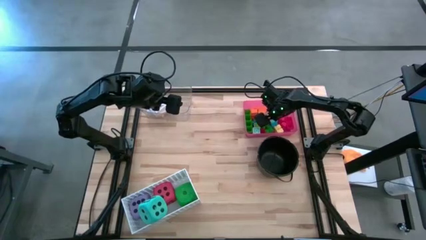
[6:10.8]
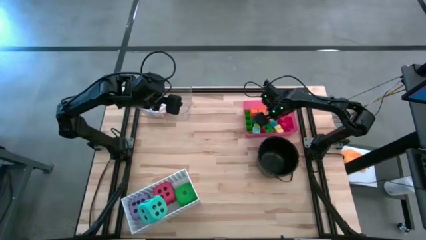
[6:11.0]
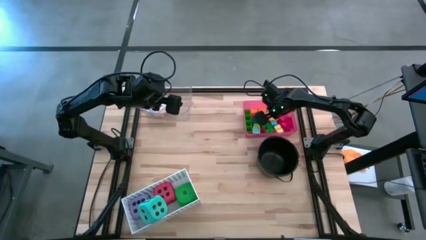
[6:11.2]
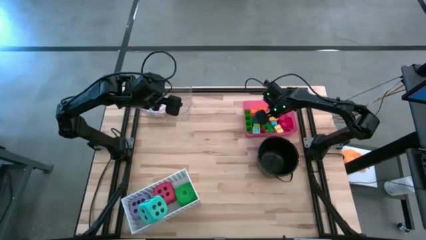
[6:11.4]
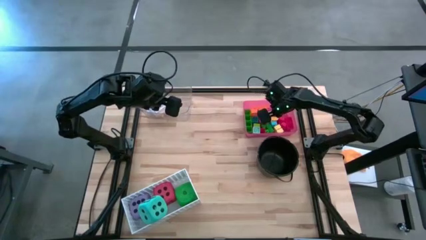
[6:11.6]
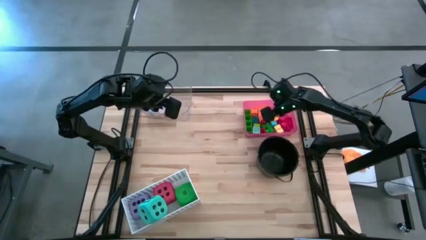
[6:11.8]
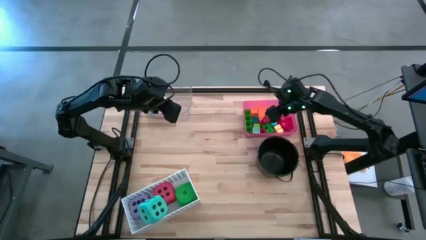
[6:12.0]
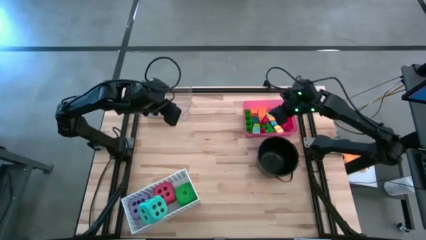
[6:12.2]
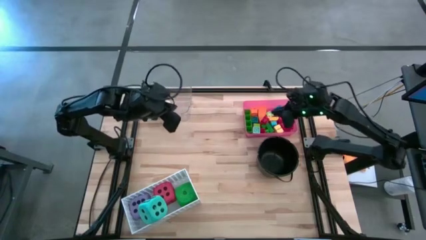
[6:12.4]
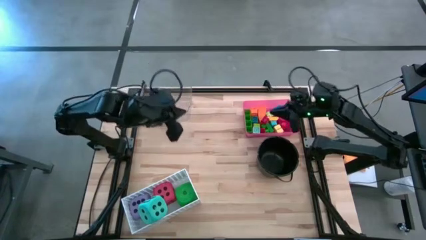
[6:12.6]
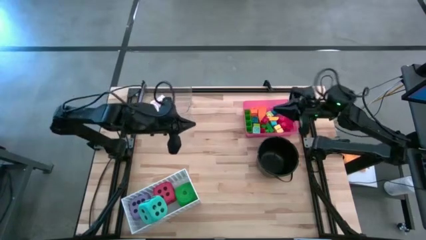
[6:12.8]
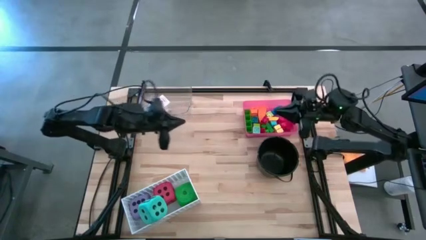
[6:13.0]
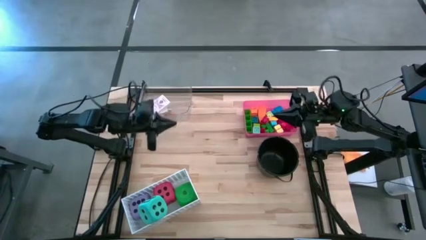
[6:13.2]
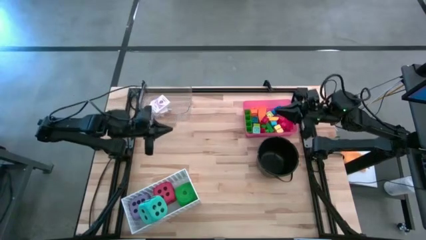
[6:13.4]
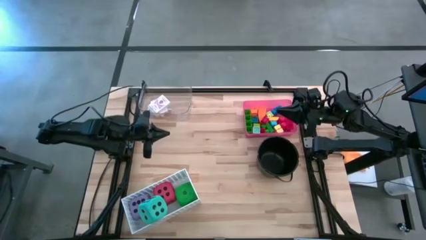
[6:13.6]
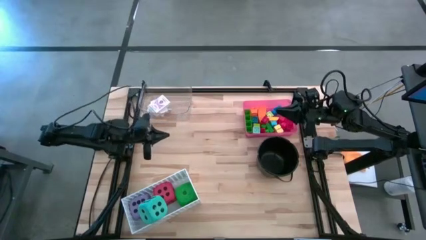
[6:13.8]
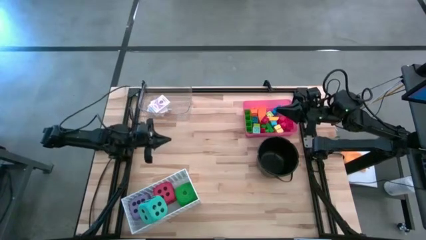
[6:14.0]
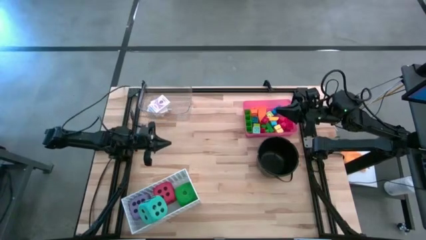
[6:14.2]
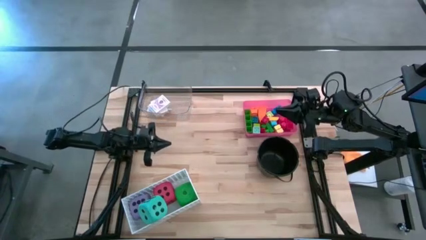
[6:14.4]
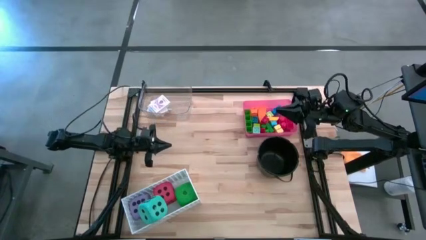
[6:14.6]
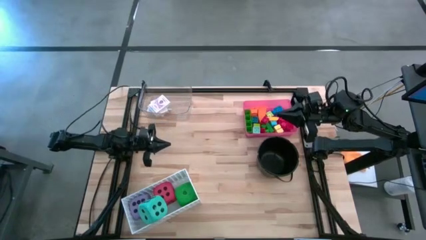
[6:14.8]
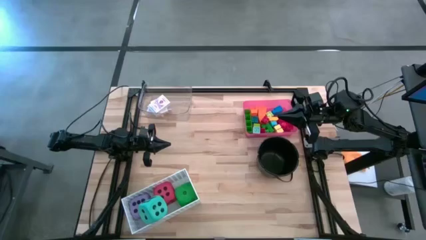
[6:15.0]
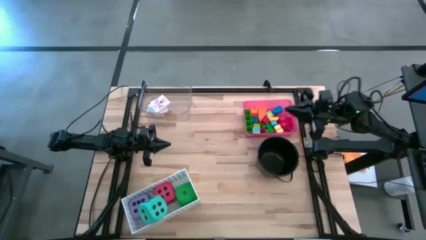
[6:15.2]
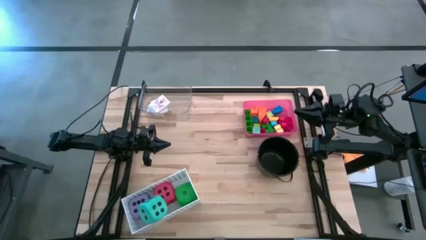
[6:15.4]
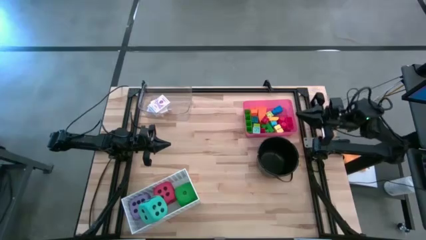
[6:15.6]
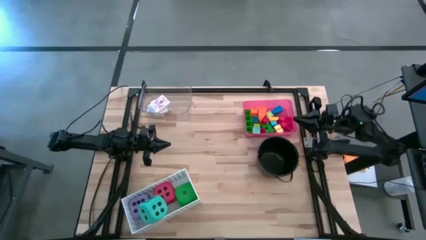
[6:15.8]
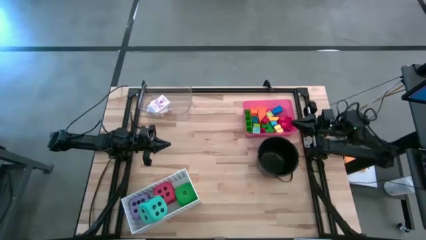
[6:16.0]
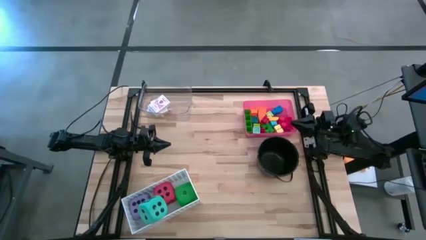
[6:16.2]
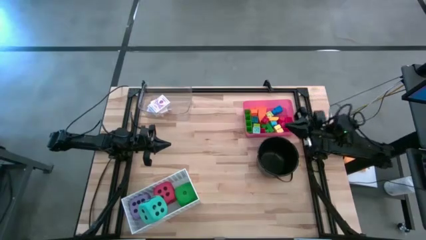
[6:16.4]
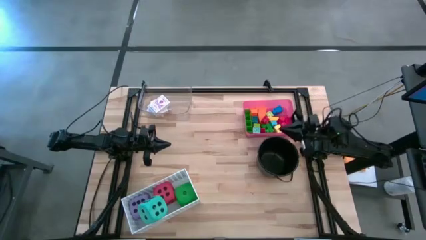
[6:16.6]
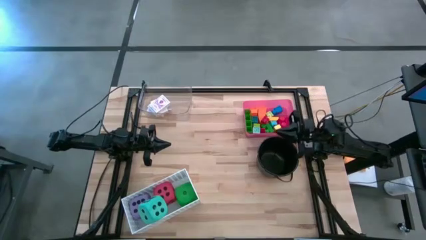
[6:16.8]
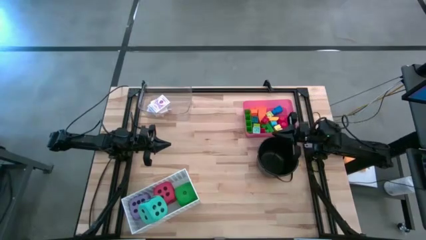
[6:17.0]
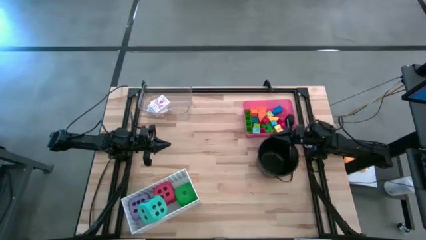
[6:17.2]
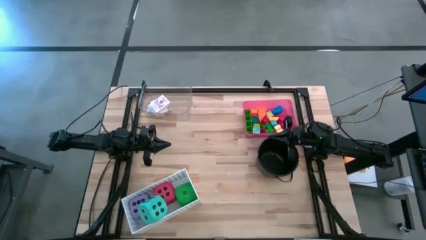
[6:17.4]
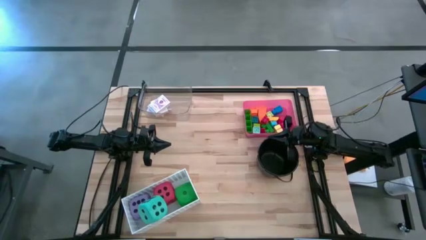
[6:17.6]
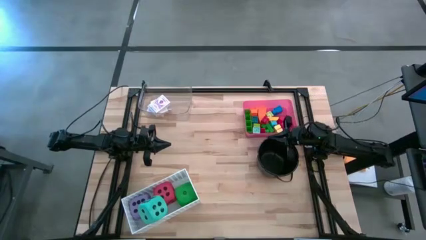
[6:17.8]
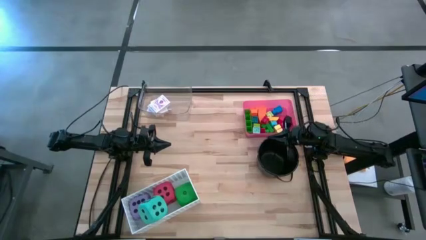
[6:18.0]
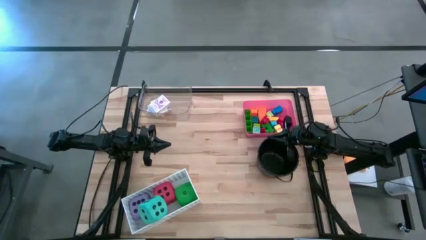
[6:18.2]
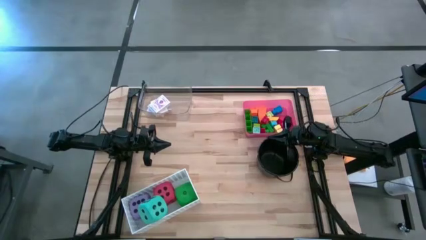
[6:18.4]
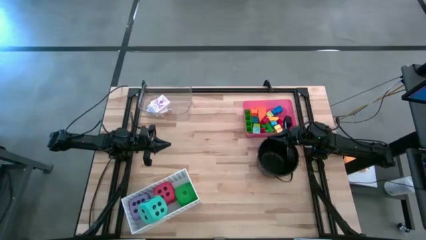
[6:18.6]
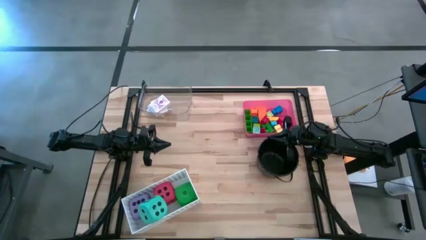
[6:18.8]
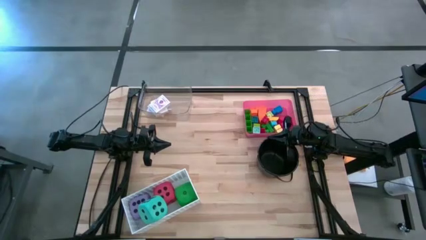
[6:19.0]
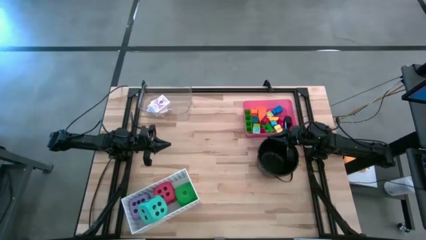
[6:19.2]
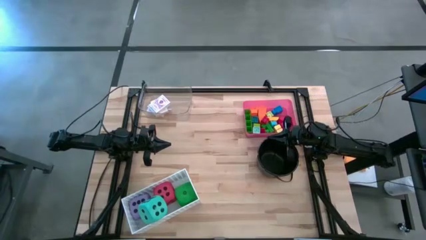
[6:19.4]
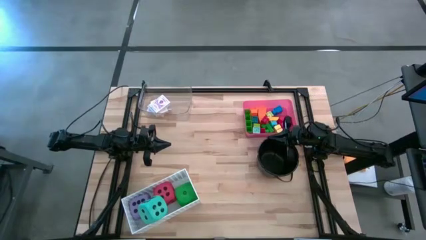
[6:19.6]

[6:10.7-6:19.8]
Task: Pick & Place Toys
Return to Home Position

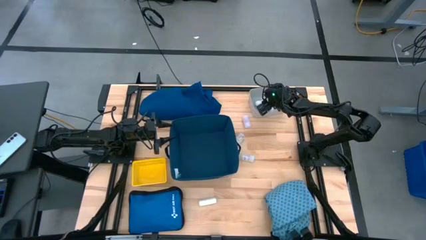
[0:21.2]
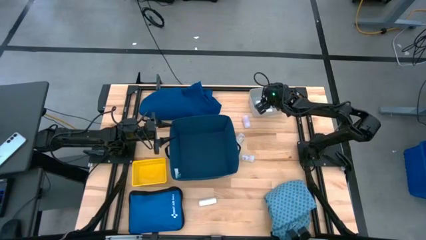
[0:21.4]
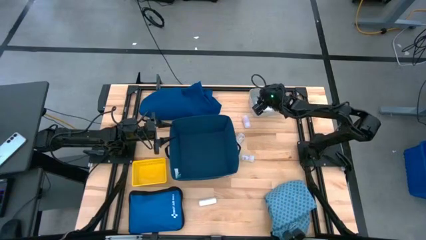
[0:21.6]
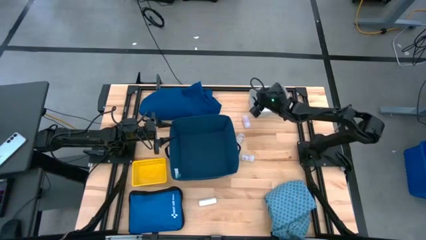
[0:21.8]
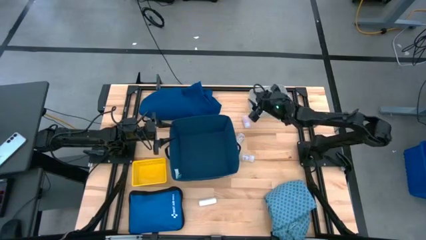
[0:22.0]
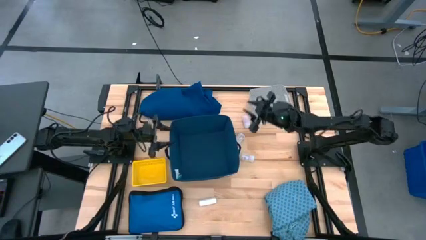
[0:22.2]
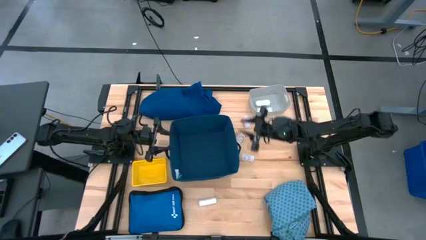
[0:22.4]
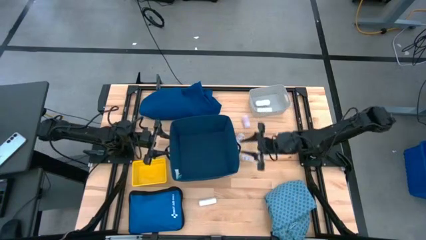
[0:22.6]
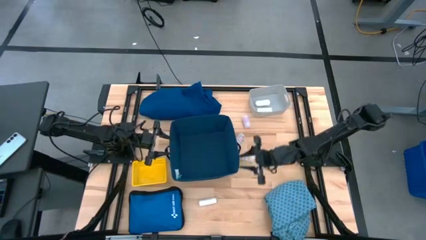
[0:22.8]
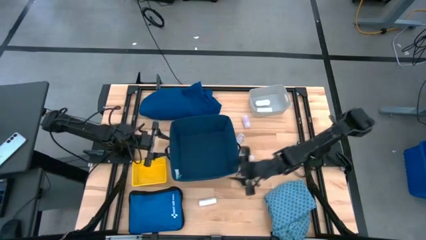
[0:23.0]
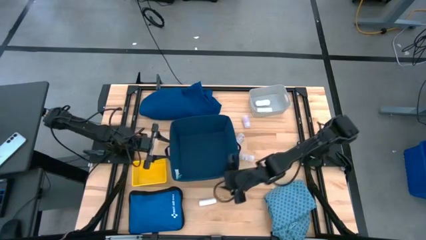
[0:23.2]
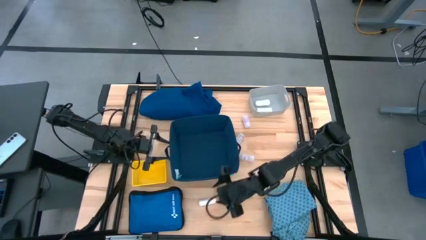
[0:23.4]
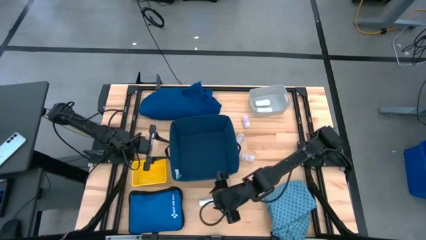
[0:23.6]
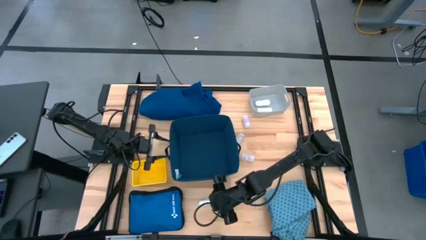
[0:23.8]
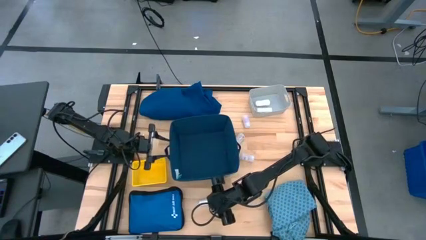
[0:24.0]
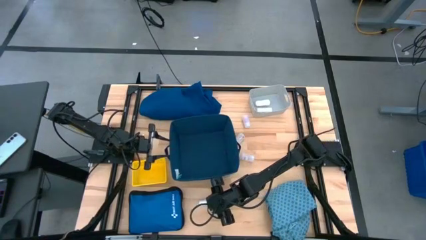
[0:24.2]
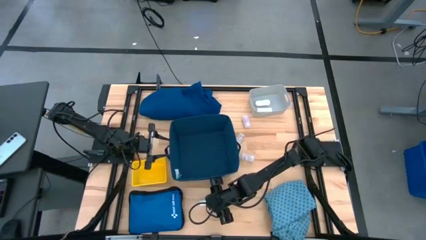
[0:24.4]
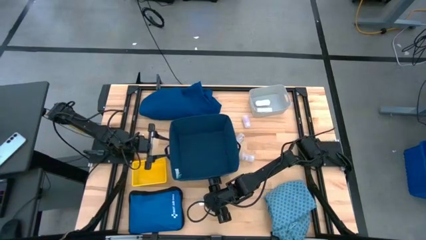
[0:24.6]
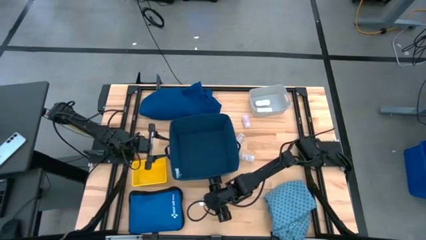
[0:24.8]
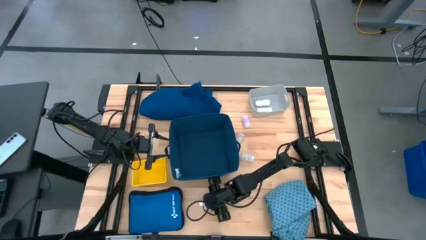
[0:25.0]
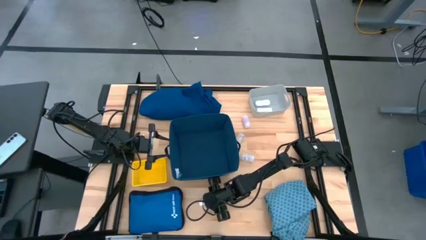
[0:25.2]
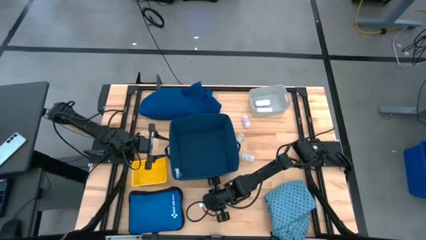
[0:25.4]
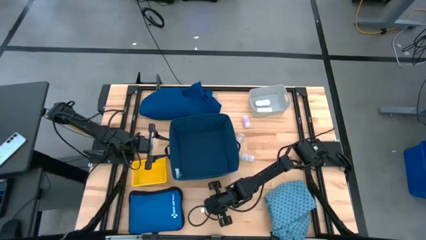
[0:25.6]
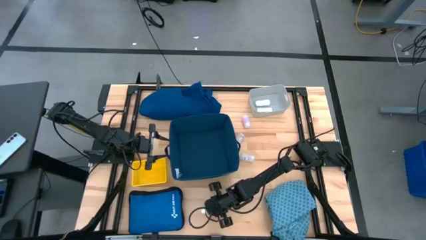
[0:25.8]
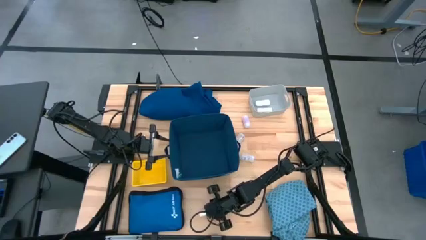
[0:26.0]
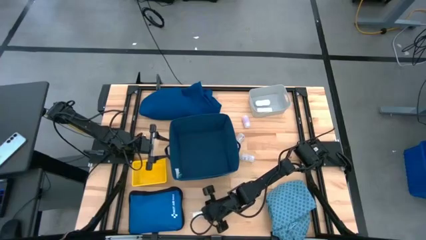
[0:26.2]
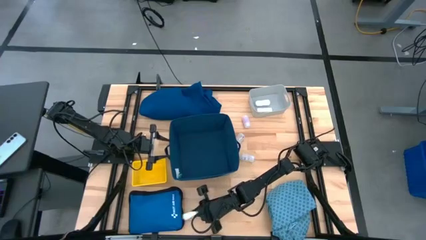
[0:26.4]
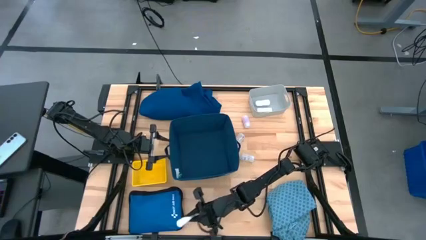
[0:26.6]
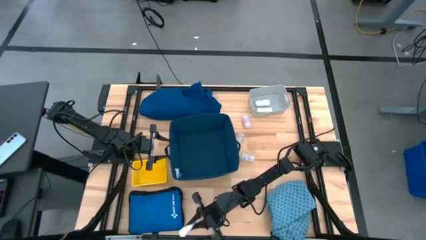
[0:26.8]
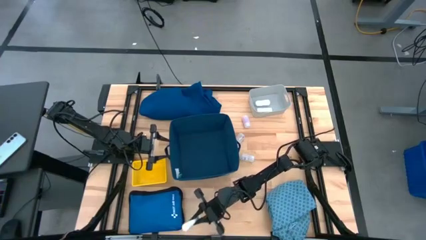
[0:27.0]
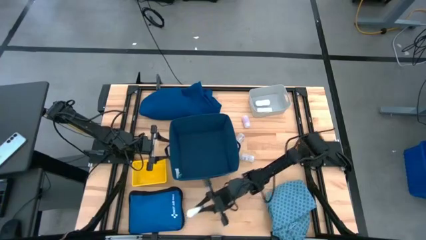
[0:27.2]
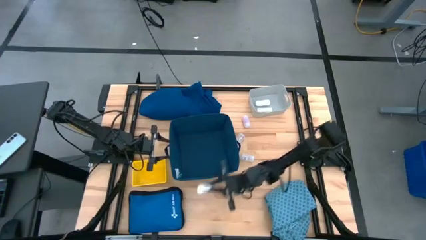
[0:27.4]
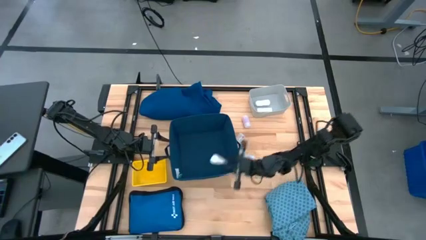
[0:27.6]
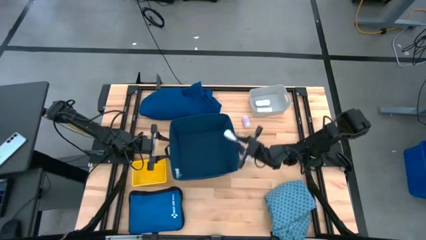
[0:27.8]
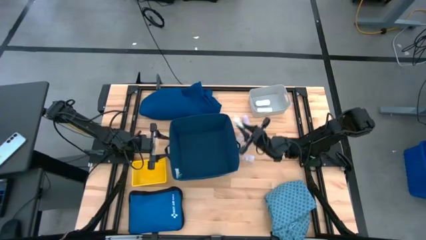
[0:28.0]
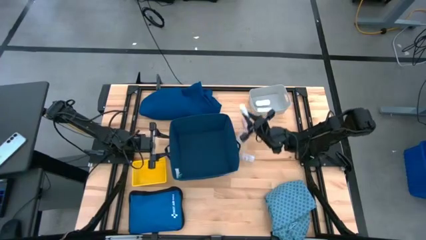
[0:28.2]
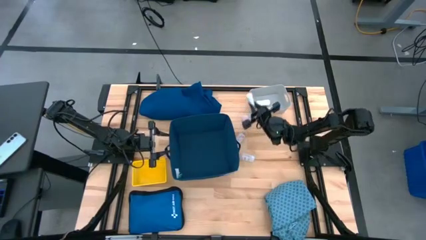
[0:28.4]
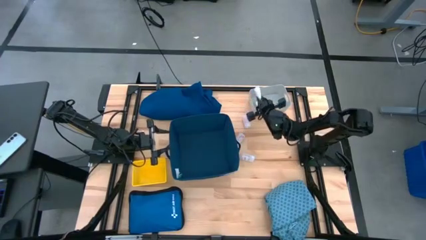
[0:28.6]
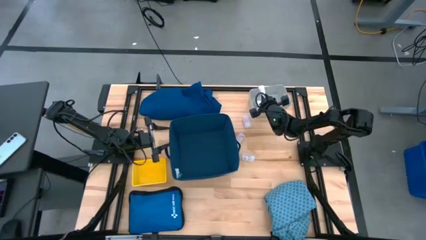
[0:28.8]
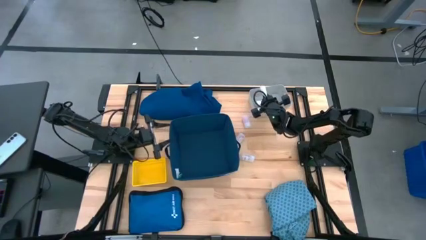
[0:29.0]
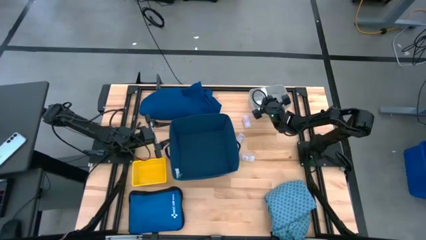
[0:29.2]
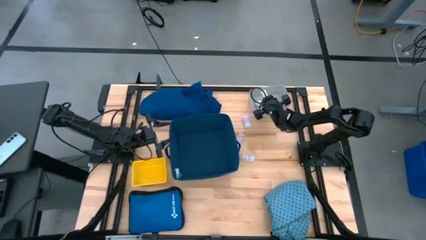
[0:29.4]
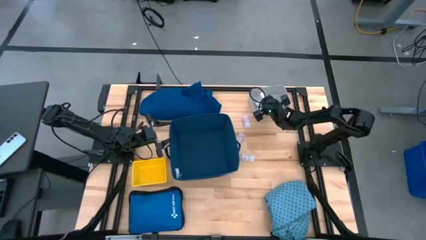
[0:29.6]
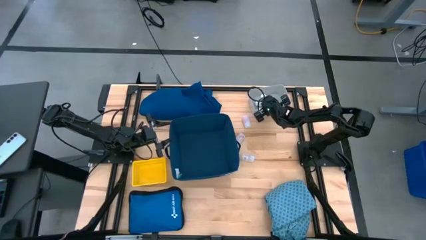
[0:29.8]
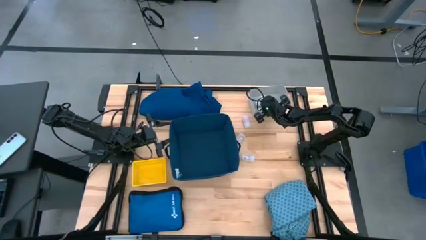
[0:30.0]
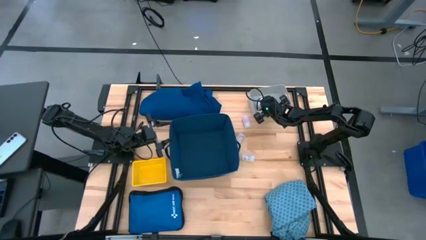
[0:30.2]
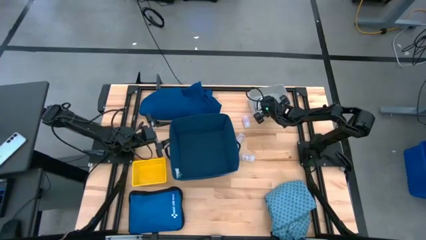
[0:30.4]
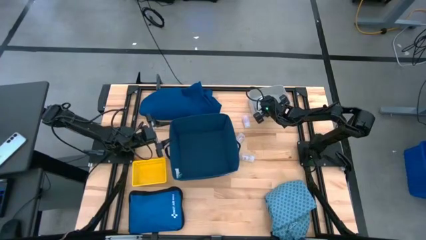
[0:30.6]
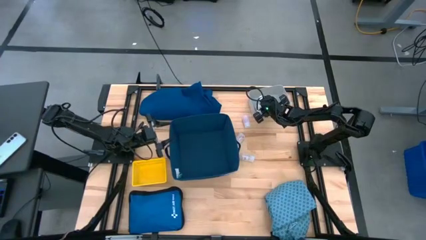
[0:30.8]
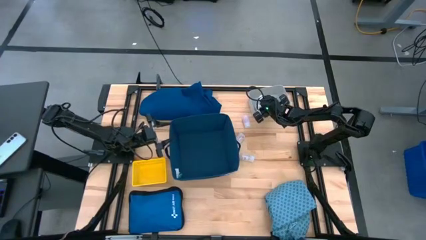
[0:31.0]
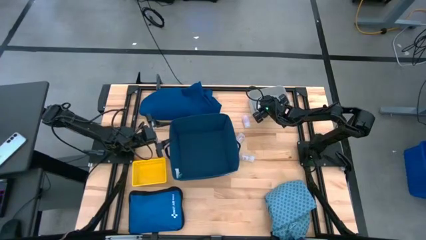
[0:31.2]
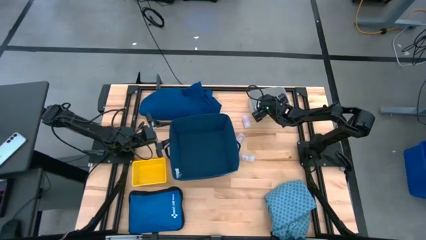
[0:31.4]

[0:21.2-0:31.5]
Task: Pick & place medical supplies in basket/bin
Put the white roll gauze into the gray bin
